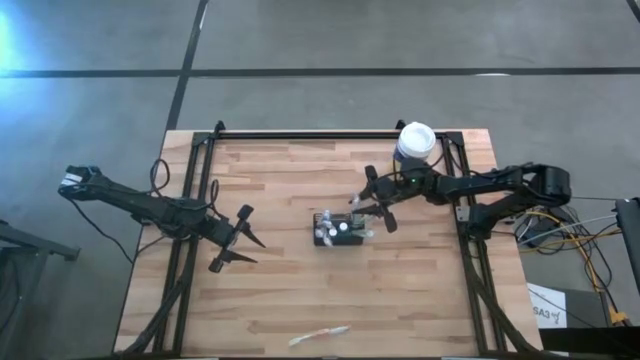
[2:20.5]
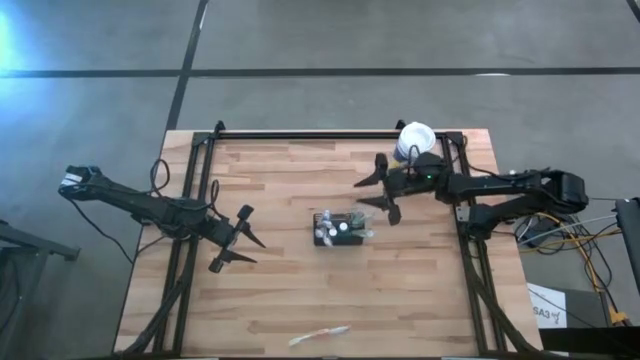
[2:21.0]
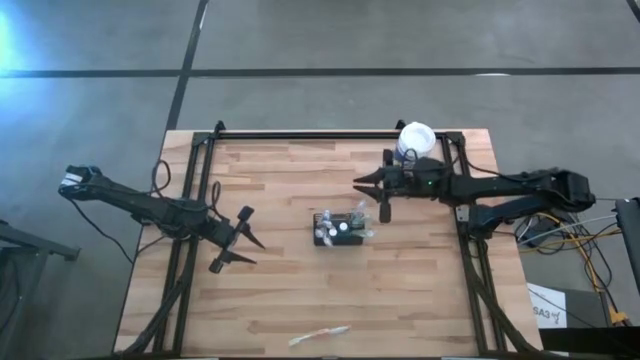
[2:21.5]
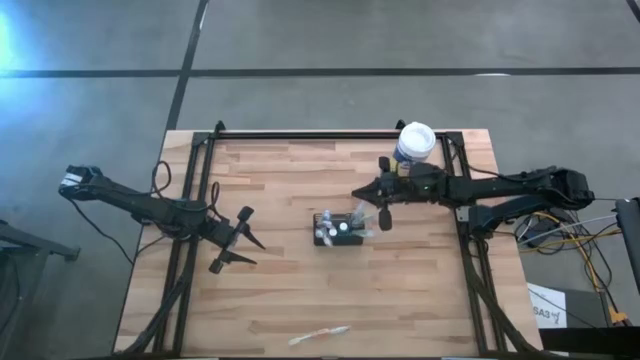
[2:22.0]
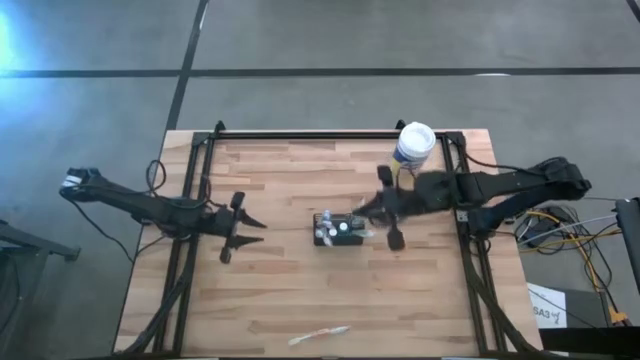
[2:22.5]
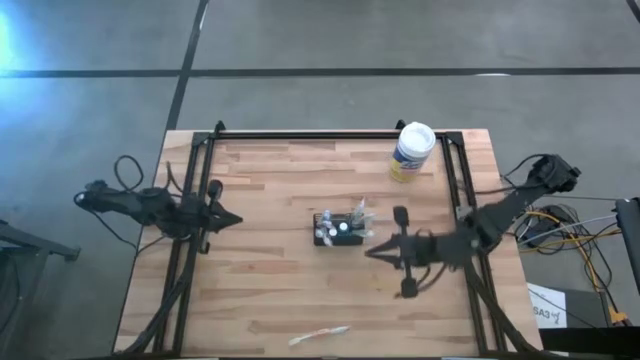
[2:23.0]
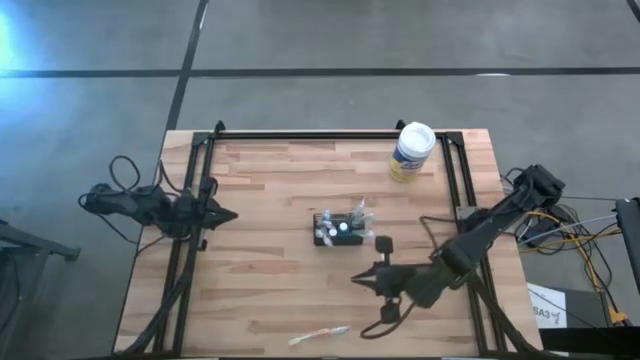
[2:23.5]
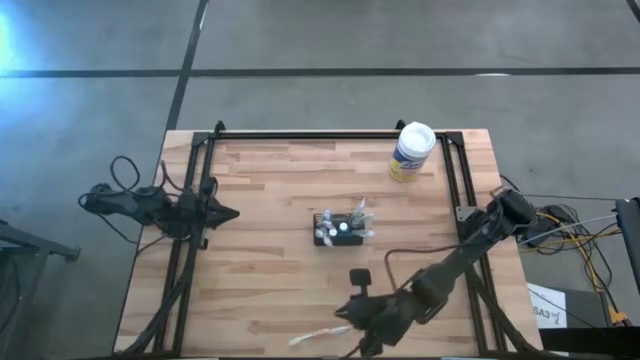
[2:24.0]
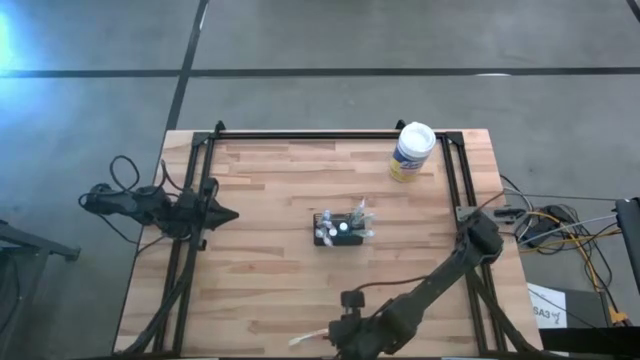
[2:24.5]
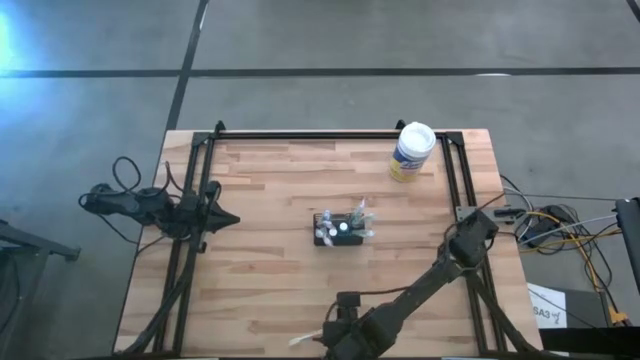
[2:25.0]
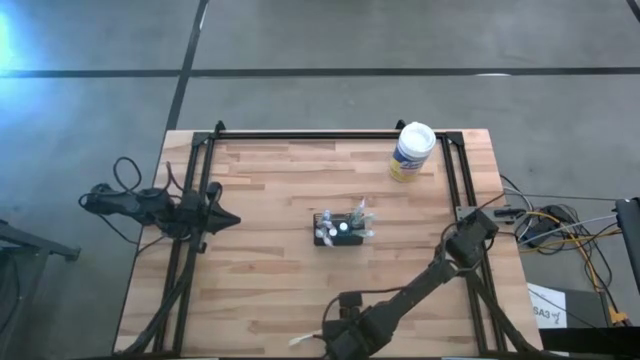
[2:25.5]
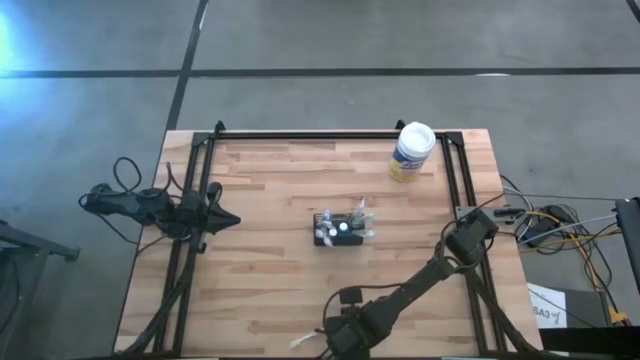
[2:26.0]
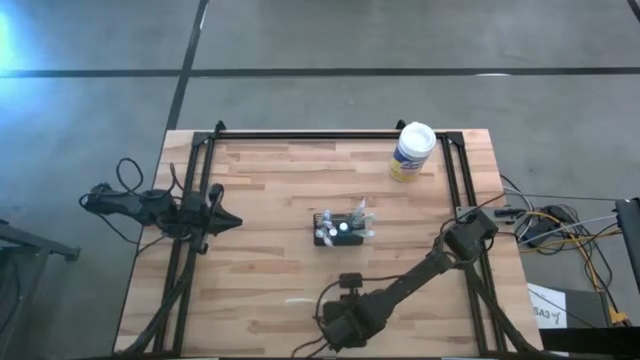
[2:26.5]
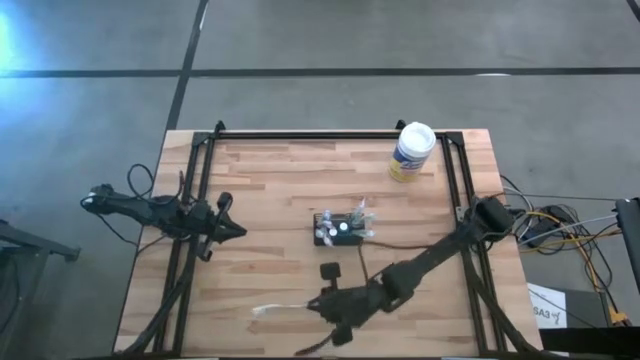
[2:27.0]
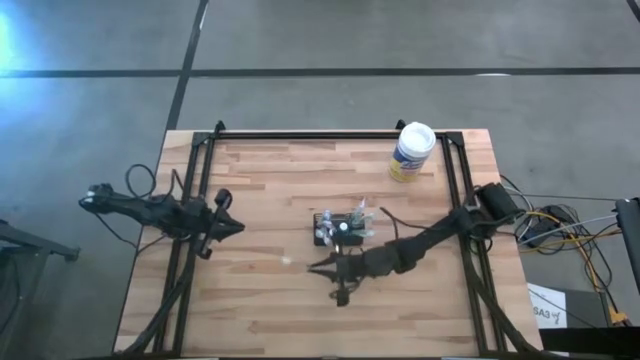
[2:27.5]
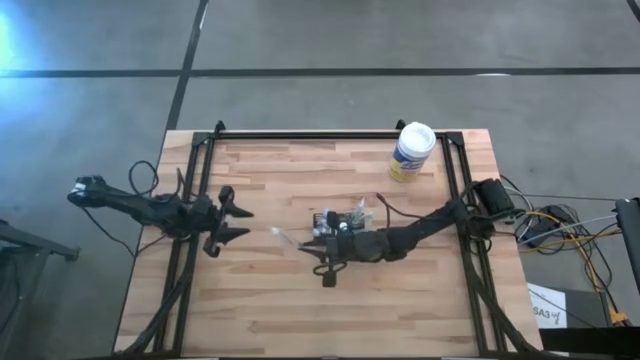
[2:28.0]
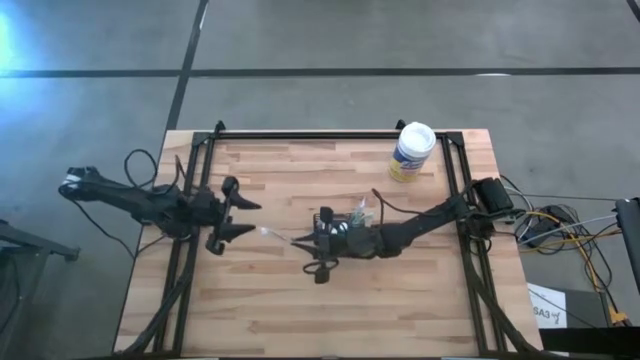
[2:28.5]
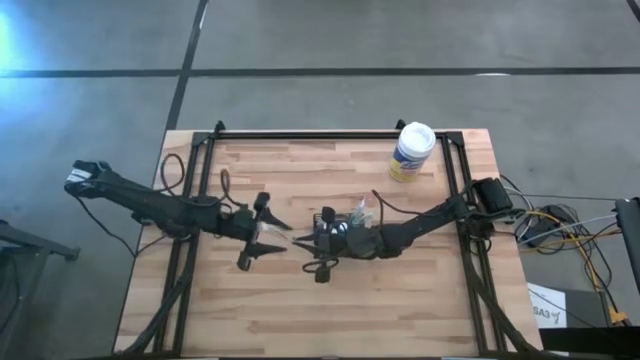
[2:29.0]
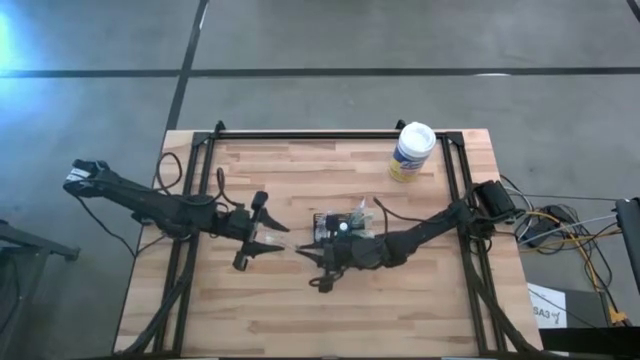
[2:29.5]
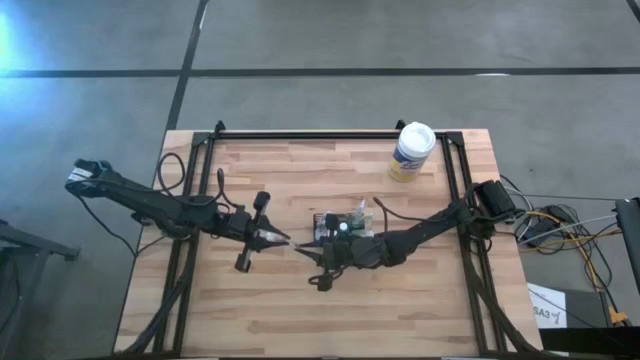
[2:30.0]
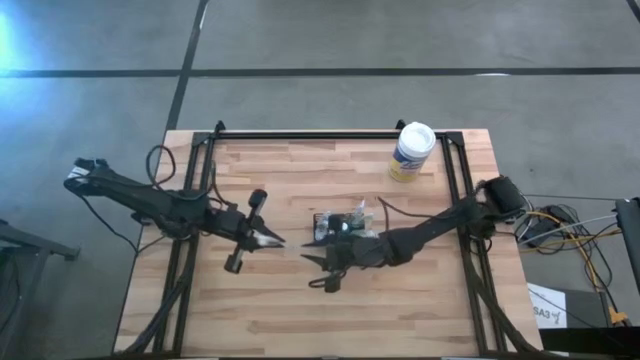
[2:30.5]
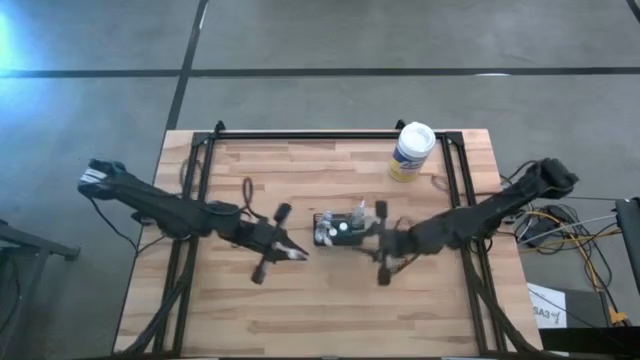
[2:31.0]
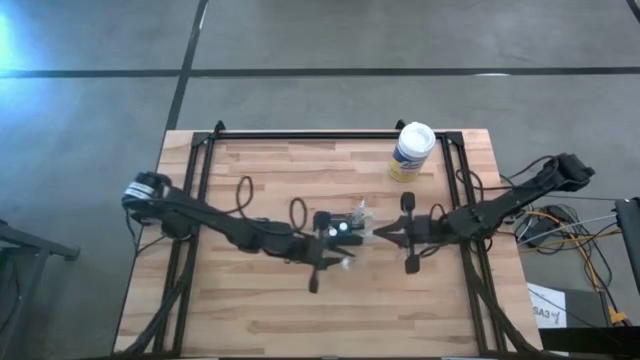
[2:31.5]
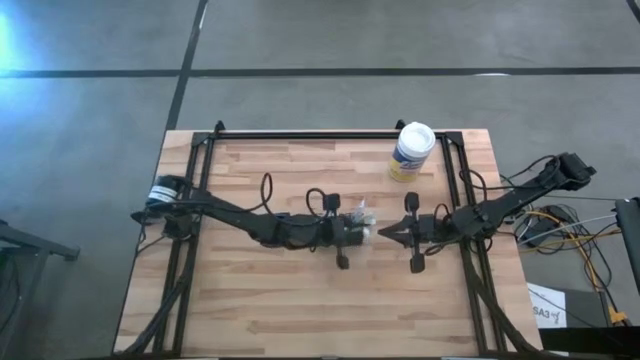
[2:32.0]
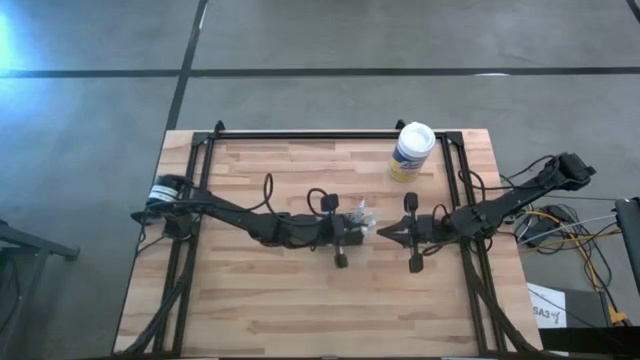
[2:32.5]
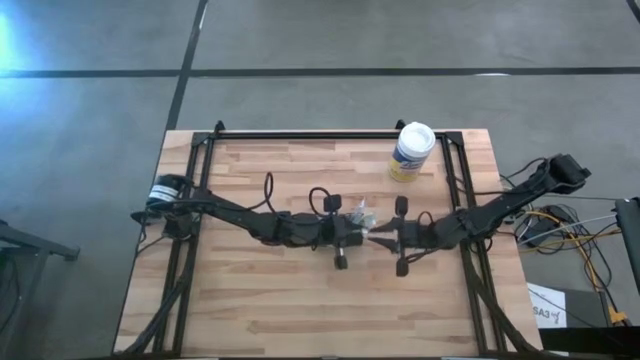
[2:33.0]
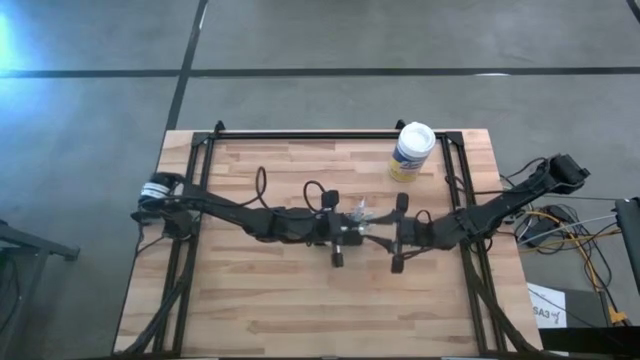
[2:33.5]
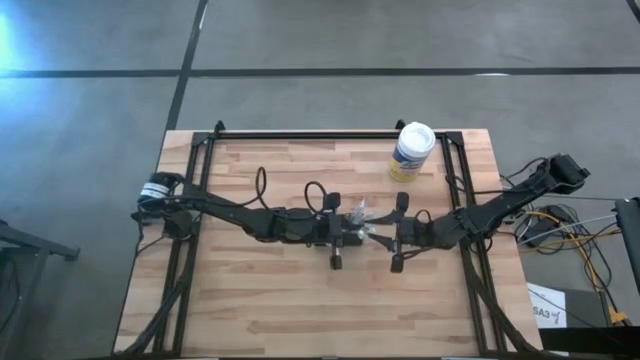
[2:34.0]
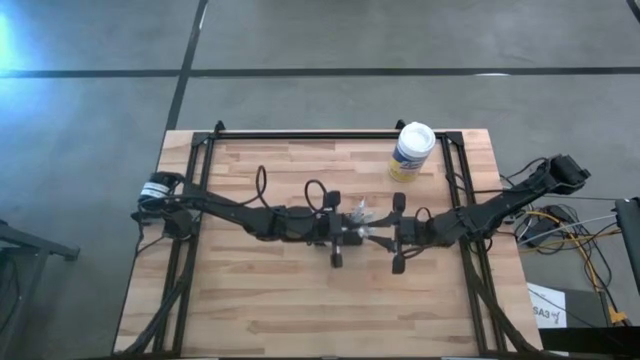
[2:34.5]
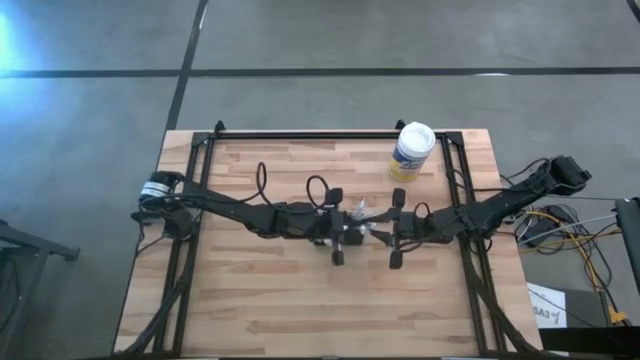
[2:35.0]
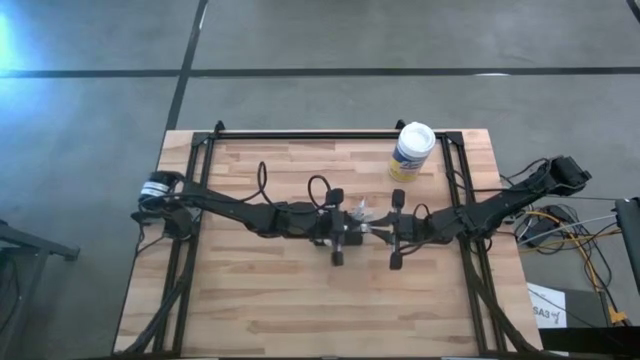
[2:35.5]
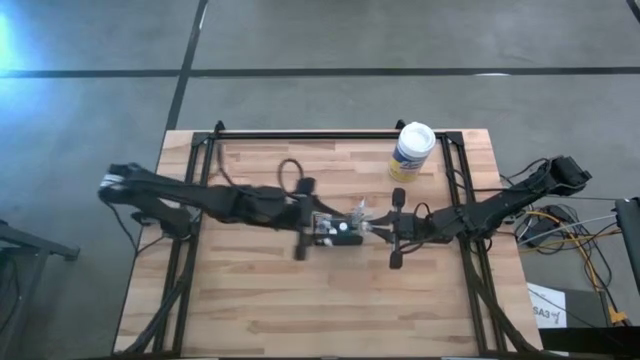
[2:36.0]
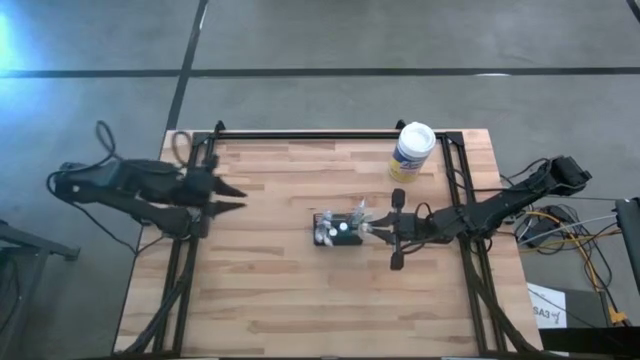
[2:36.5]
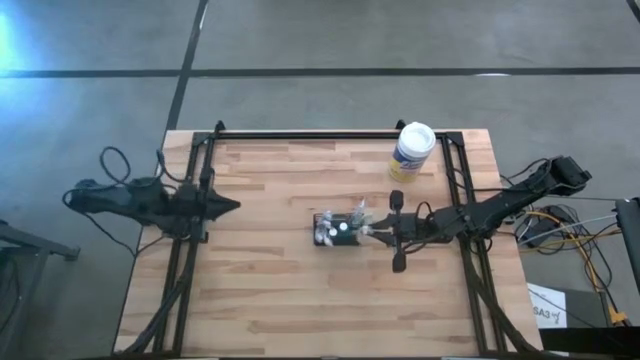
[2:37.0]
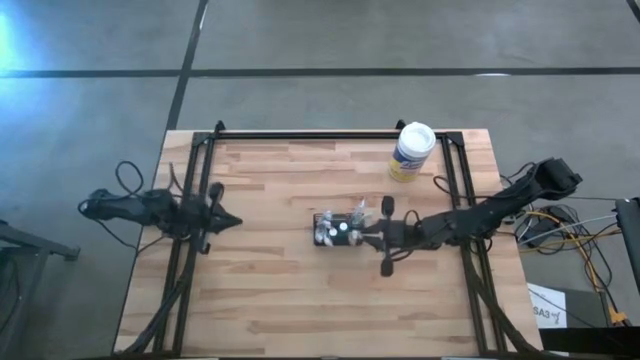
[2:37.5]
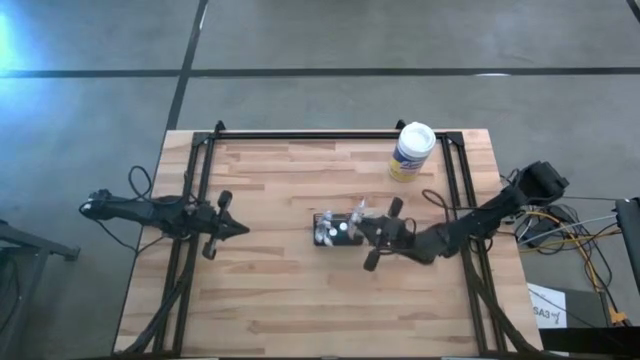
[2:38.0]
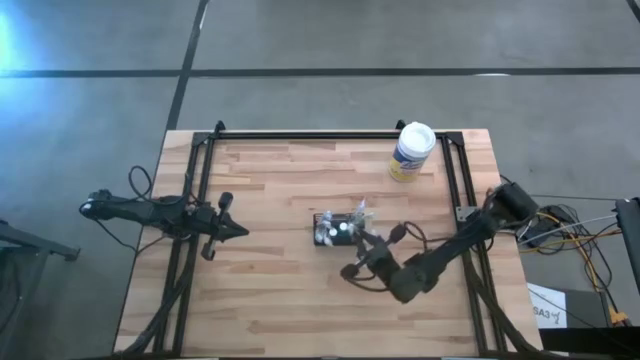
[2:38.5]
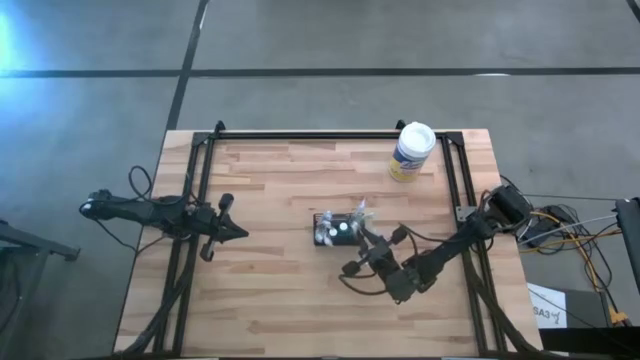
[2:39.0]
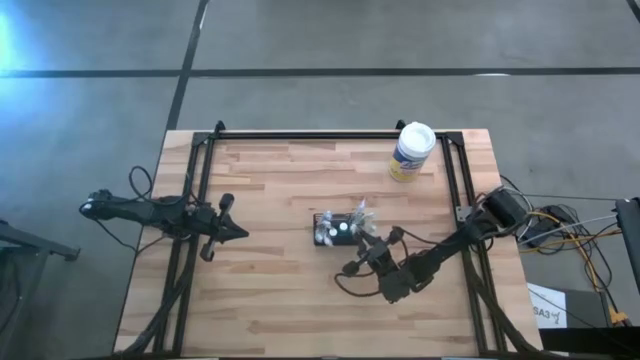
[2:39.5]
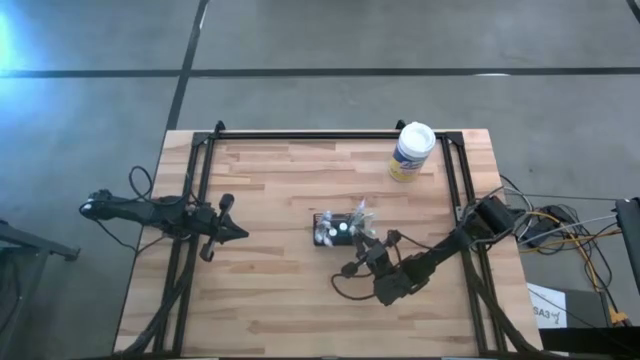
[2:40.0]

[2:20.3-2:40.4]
Task: Pick & Place toothbrushing station
Put the orange toothbrush into the mesh organizer

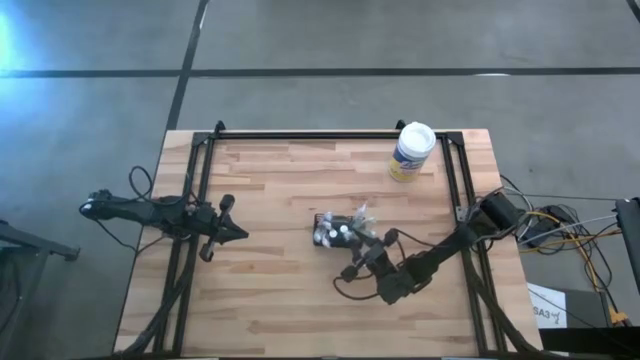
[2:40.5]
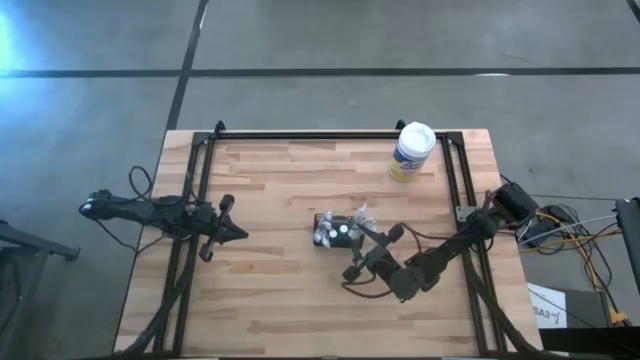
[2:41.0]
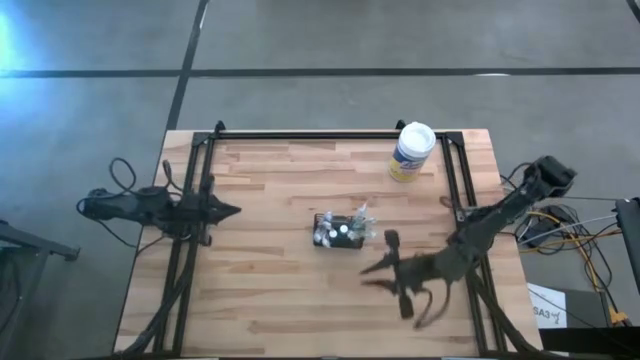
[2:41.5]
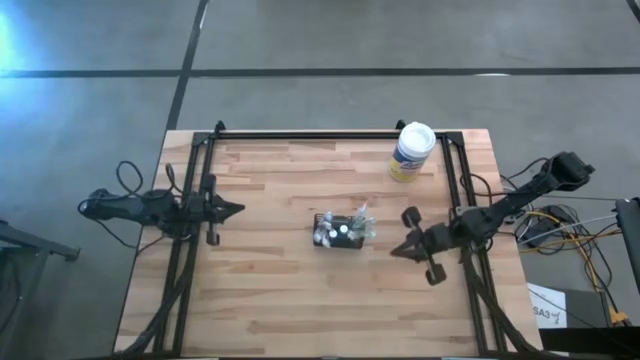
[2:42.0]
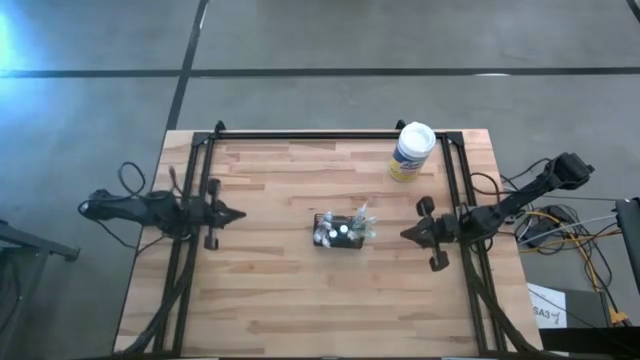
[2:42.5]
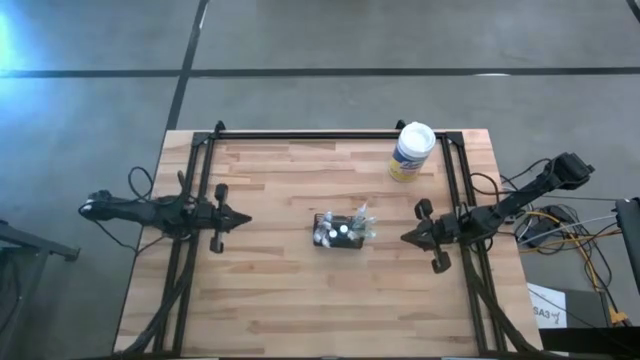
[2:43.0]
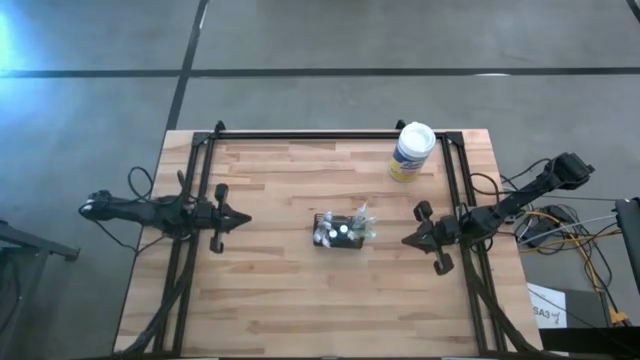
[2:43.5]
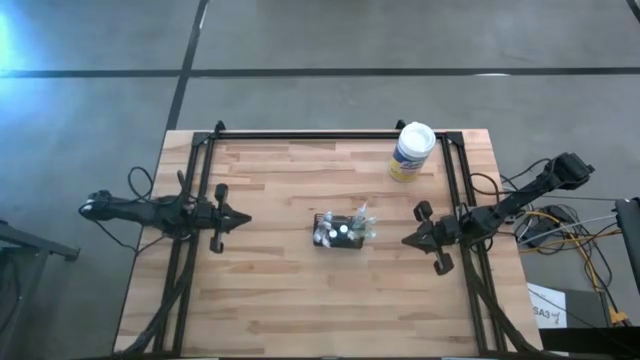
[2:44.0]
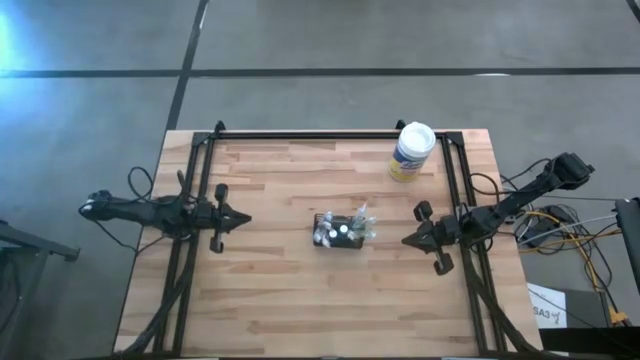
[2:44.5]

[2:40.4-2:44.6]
Return to Home Position
